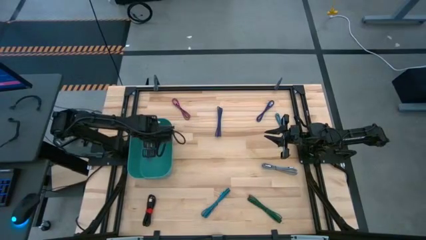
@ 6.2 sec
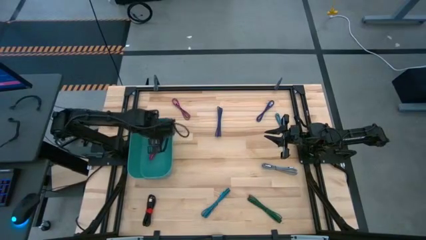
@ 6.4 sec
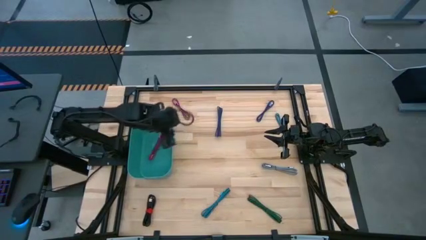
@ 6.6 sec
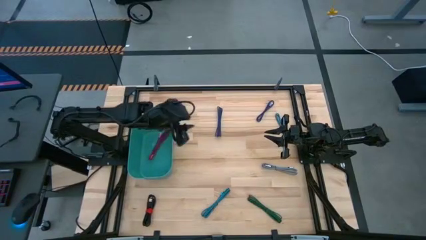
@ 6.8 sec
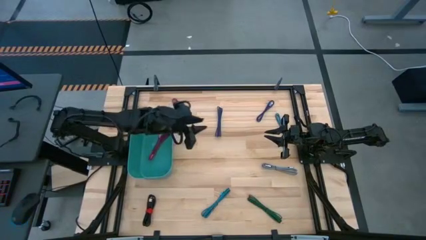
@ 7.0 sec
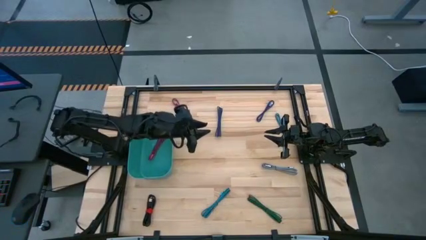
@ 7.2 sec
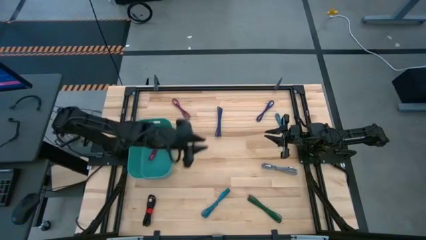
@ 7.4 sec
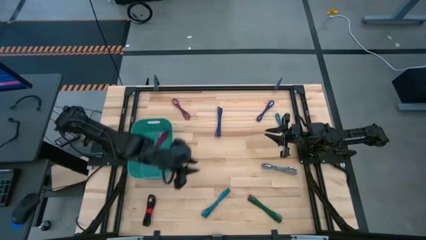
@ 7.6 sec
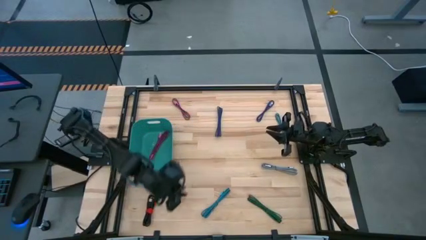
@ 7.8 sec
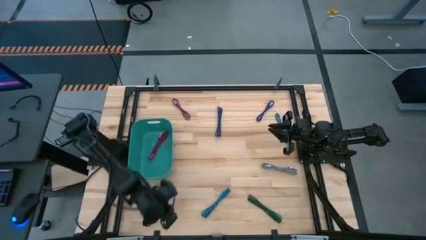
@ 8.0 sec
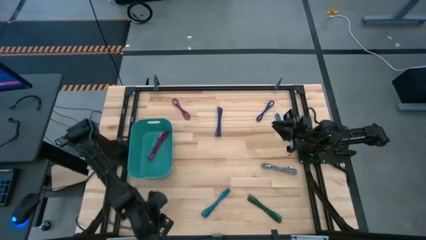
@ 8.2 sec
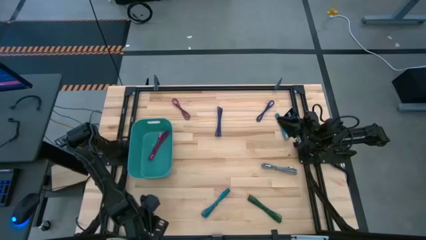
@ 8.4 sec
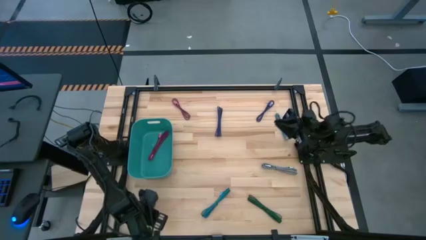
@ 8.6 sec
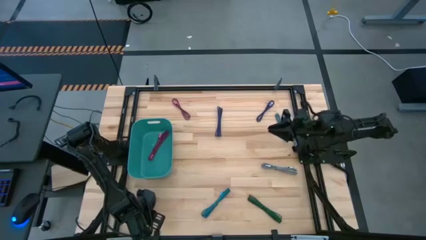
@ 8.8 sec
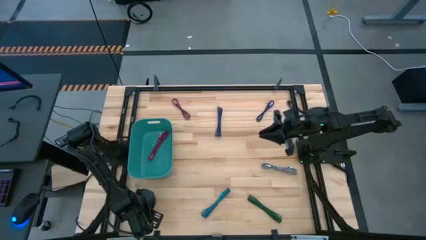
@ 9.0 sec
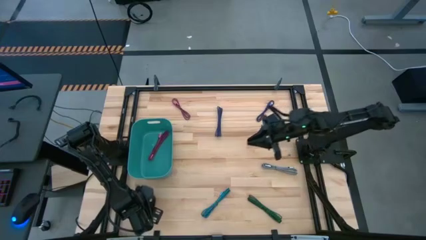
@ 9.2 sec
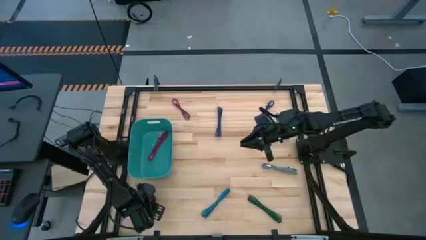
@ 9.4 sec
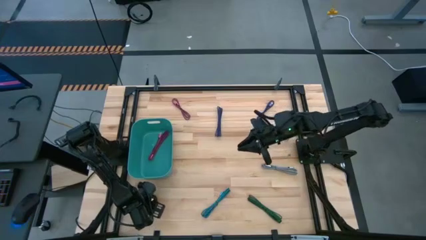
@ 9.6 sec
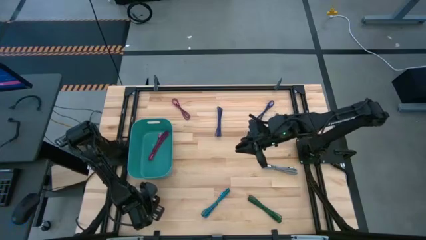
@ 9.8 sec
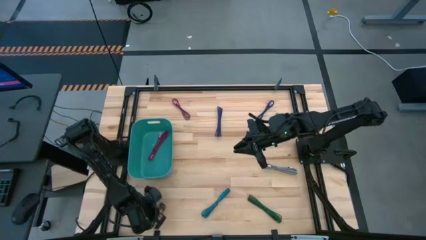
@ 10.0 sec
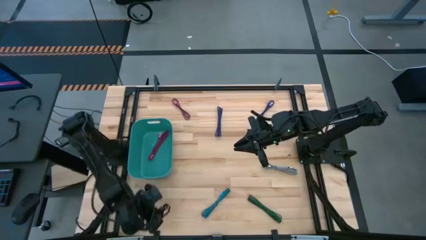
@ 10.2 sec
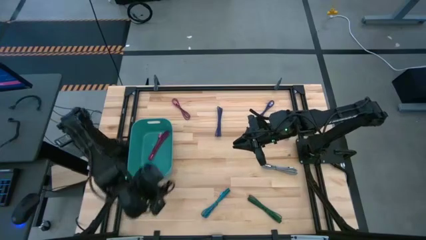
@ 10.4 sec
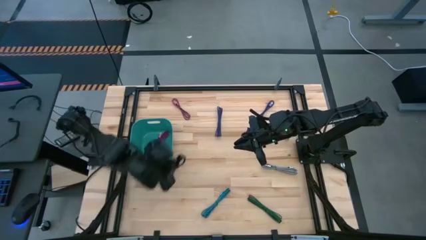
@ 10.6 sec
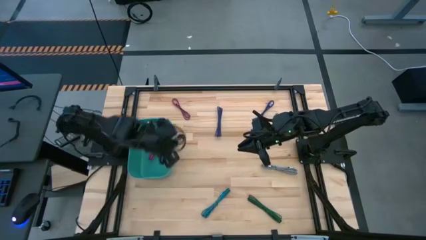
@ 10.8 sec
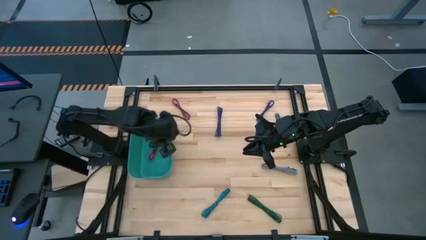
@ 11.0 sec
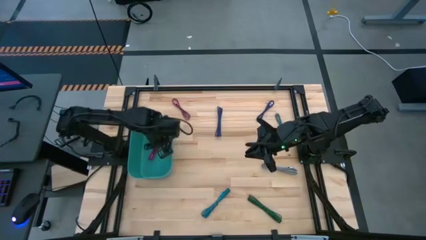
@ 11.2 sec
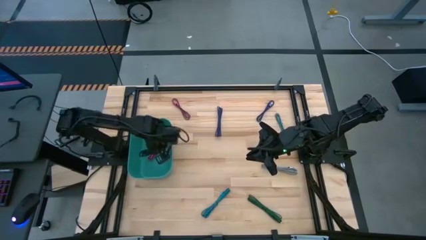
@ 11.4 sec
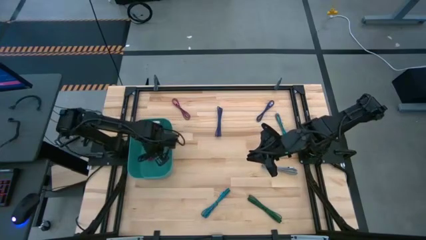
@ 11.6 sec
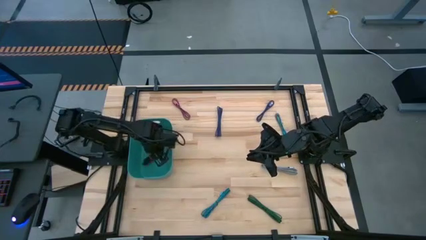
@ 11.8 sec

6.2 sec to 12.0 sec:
Task: Pick and place USB-C Cables
Put the black charger cable into the blue bin

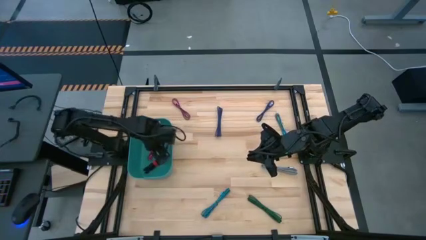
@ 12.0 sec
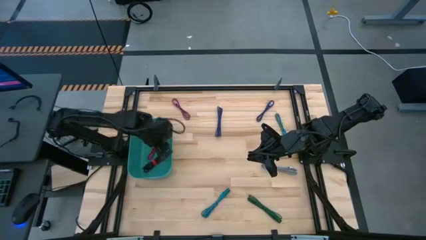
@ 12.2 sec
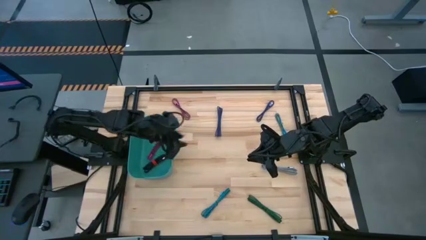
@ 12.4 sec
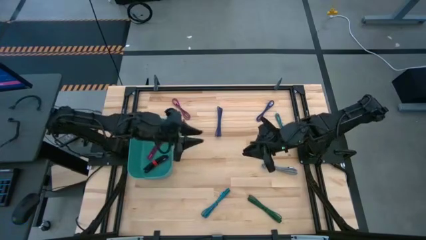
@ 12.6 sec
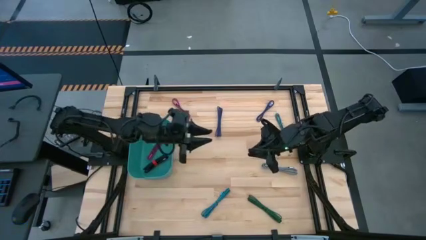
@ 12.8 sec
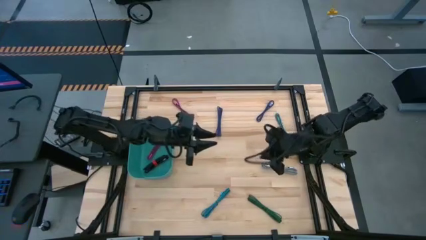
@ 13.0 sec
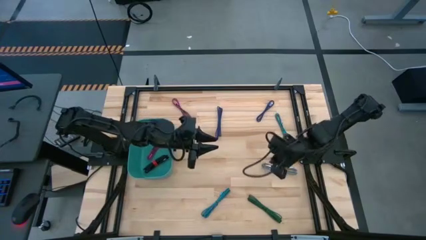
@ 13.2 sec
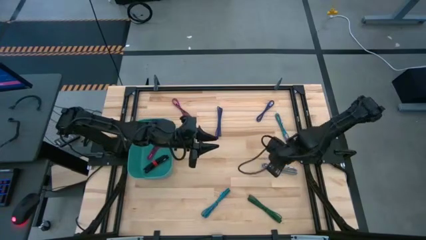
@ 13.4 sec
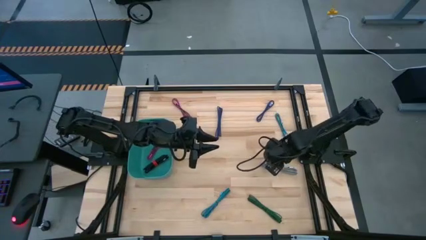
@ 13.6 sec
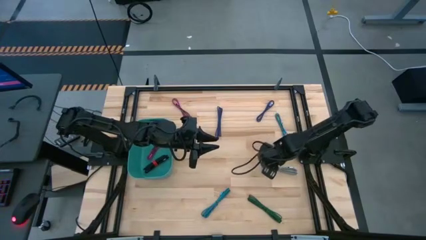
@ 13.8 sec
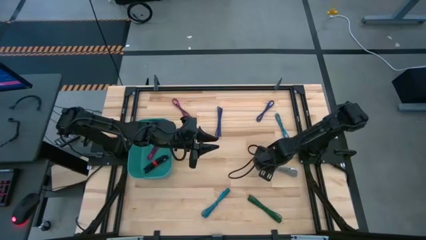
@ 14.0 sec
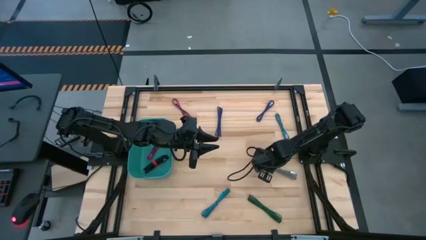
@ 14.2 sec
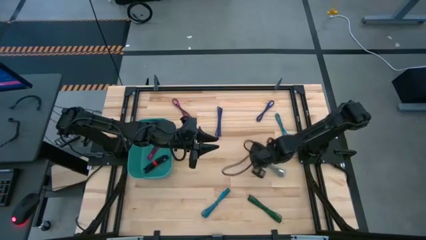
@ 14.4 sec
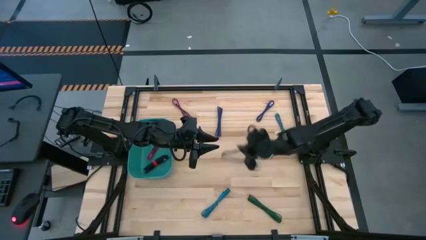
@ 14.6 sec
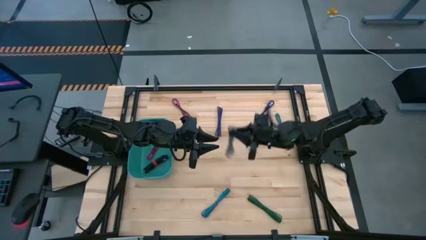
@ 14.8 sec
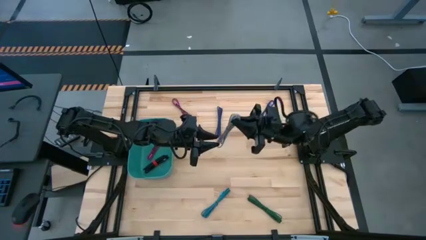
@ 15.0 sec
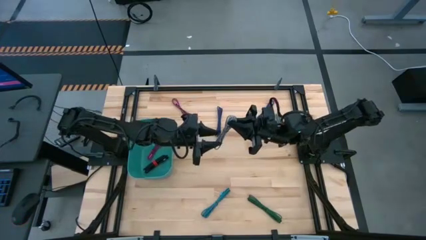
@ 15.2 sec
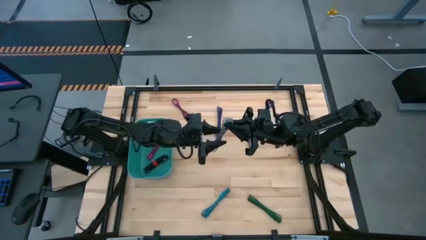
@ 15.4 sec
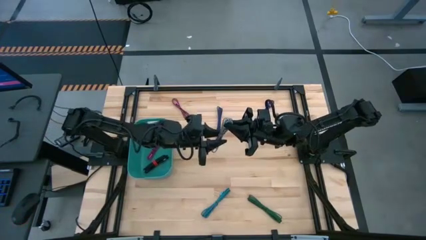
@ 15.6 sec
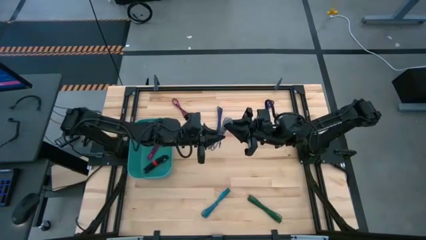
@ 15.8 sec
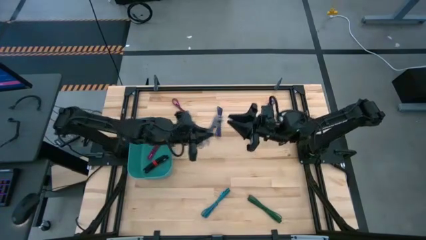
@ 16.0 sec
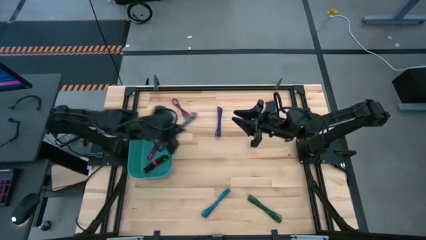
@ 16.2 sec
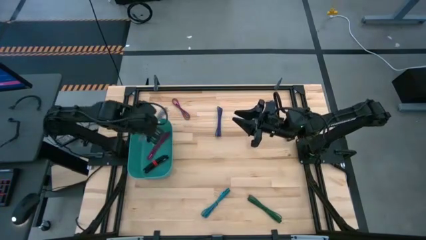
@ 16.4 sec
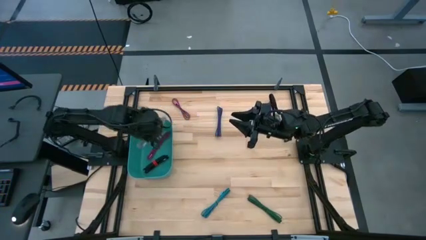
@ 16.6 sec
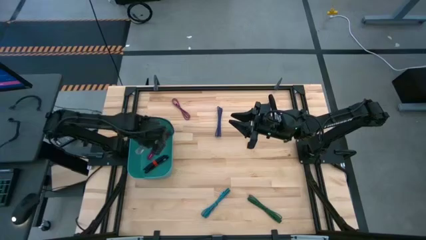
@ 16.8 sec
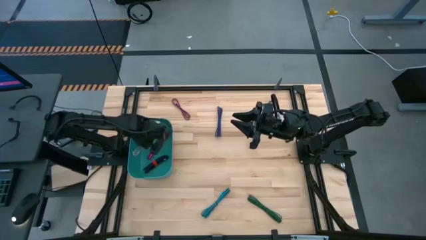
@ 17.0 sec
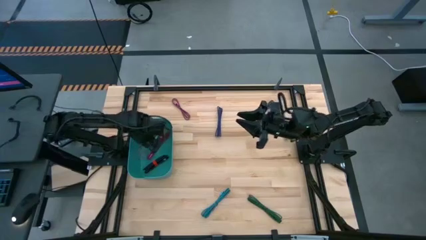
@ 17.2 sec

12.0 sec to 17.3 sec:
Put the white charger cable into the blue bin

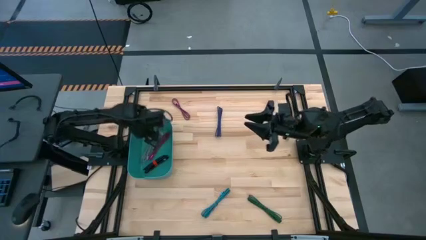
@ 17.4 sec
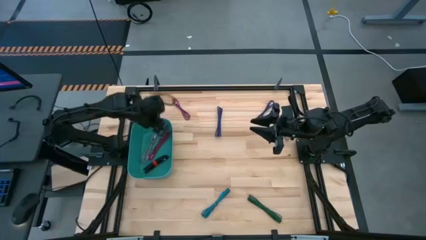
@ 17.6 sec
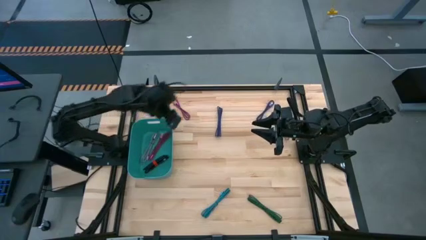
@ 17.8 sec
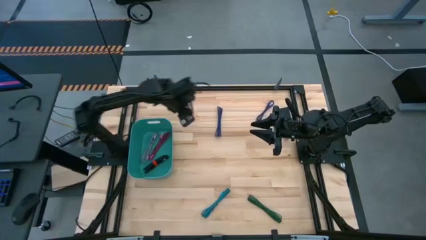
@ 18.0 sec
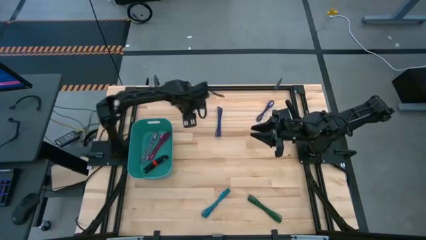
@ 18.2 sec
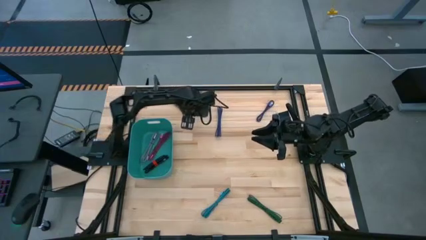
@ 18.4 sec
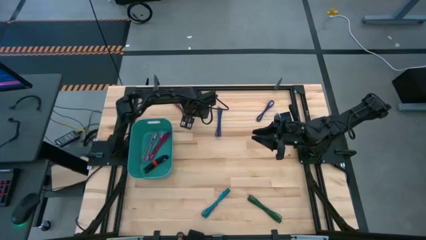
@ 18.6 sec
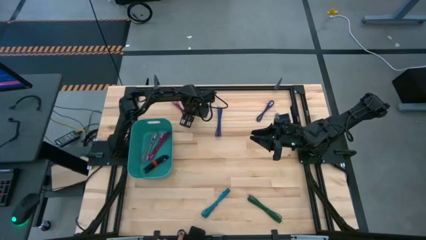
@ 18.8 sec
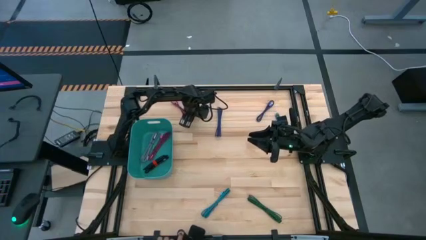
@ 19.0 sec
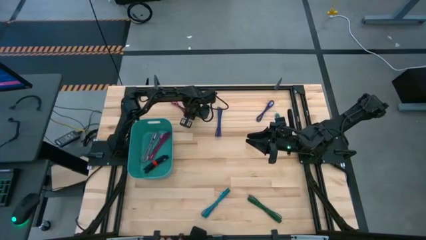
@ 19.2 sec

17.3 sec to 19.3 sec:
Put the red charger cable into the blue bin

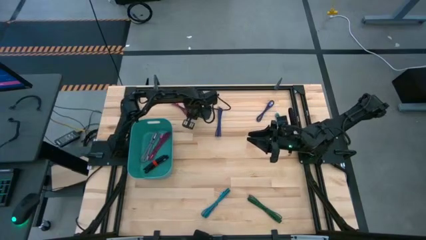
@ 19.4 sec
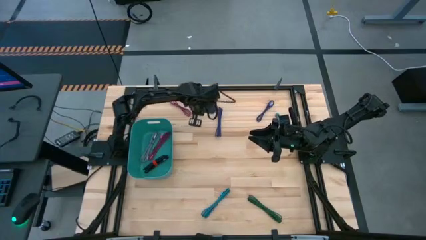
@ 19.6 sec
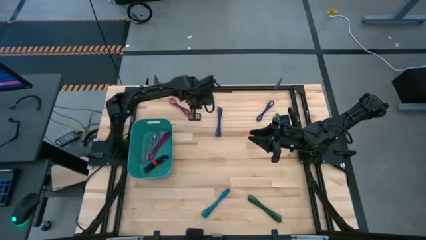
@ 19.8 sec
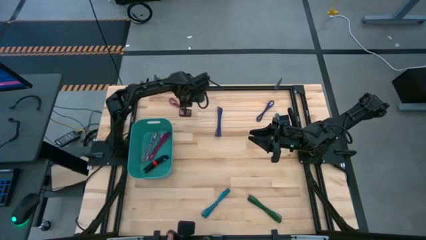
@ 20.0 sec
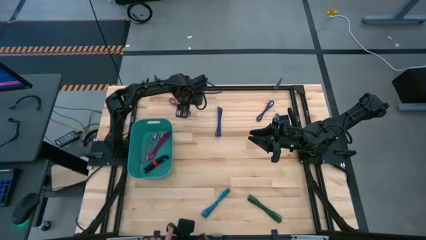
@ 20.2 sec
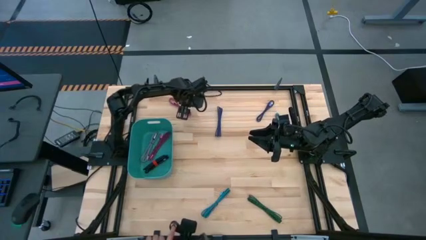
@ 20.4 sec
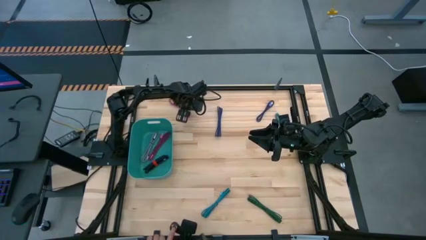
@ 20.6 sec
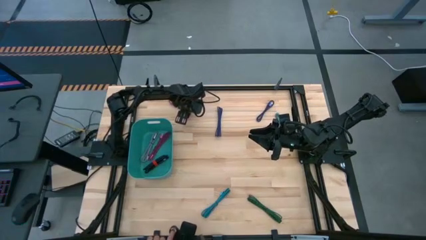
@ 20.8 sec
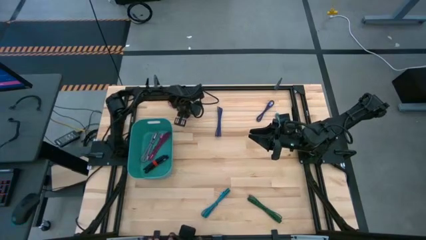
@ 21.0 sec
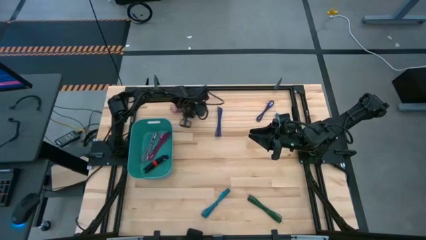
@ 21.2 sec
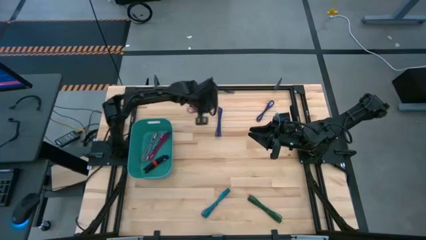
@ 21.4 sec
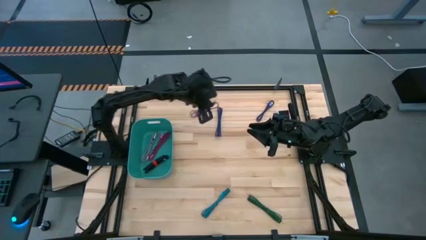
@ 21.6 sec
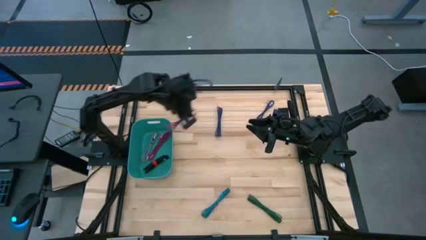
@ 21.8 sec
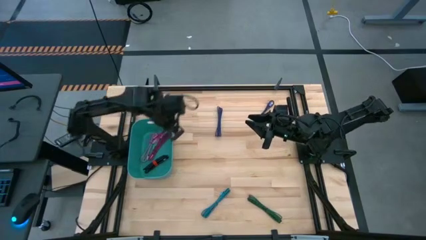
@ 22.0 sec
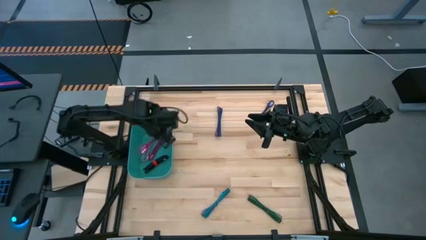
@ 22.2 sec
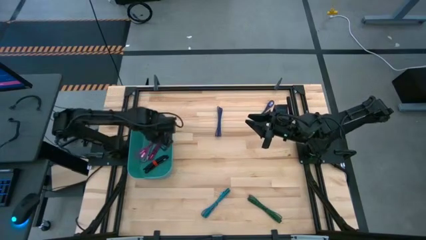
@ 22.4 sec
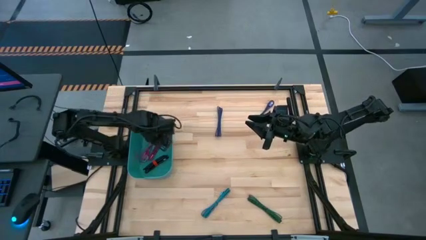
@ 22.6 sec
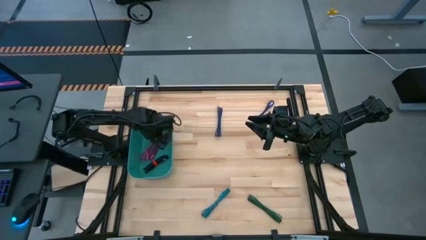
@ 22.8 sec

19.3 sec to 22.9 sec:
Put the red charger cable into the blue bin
